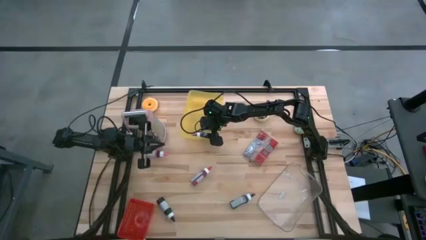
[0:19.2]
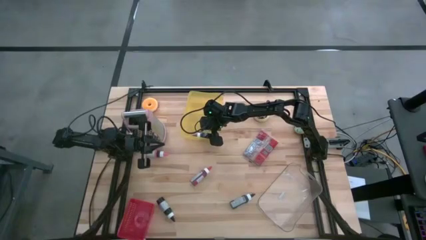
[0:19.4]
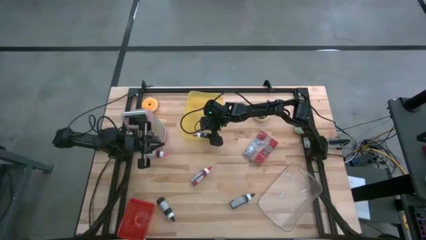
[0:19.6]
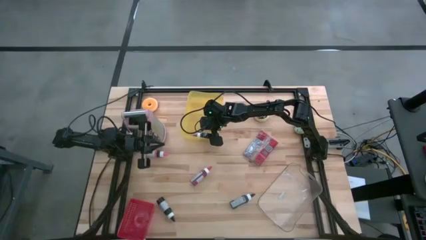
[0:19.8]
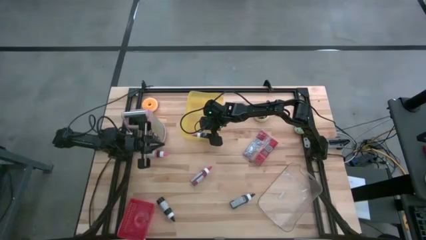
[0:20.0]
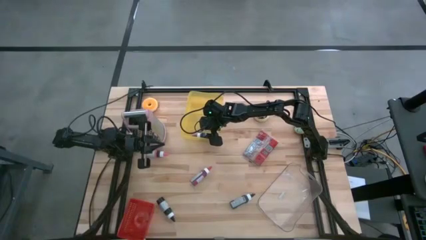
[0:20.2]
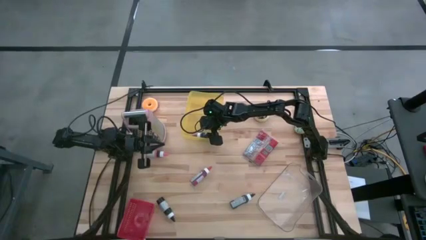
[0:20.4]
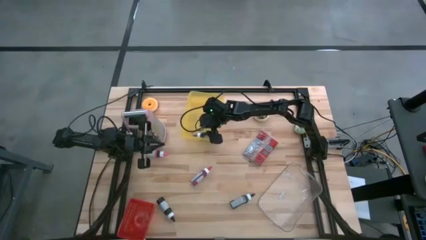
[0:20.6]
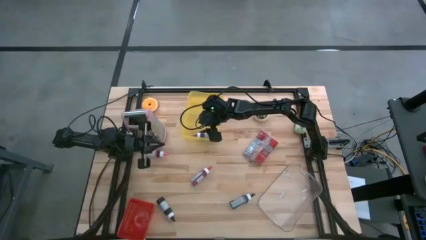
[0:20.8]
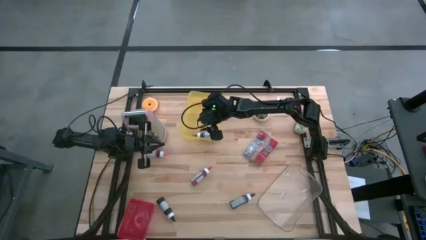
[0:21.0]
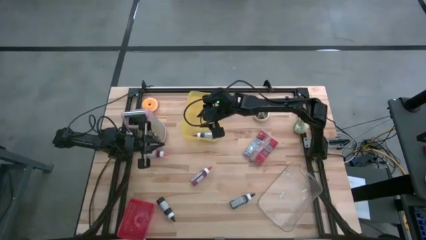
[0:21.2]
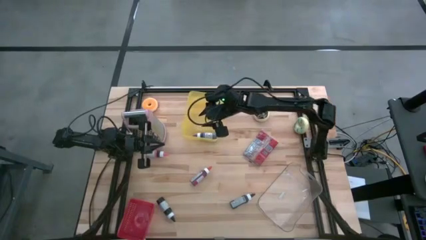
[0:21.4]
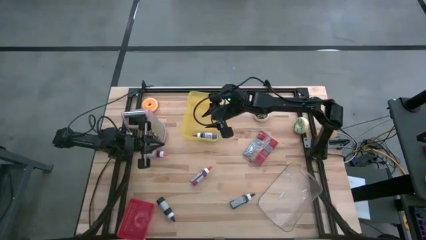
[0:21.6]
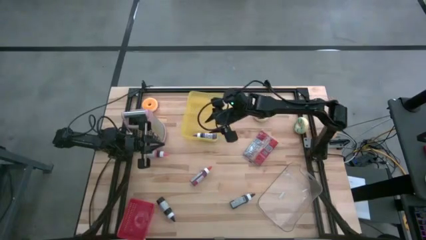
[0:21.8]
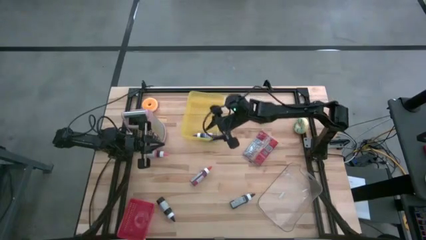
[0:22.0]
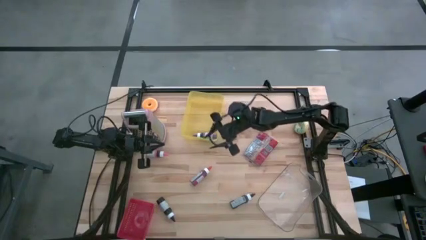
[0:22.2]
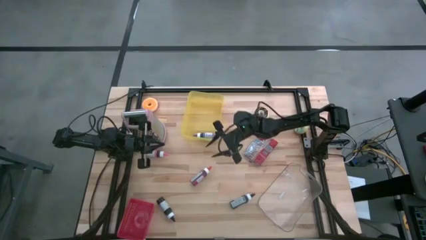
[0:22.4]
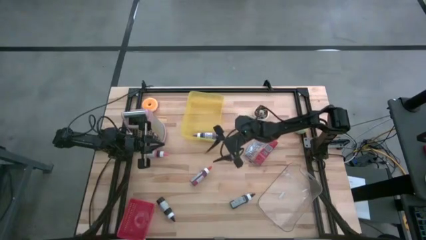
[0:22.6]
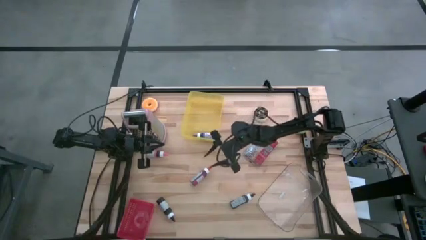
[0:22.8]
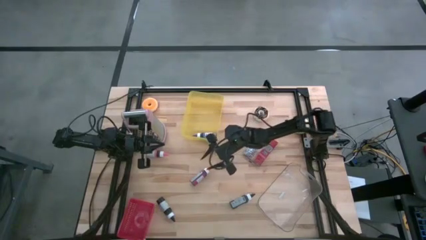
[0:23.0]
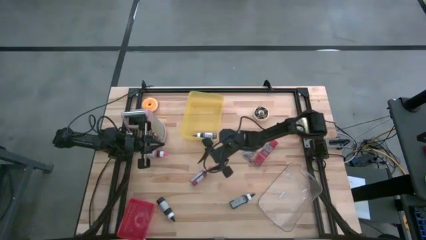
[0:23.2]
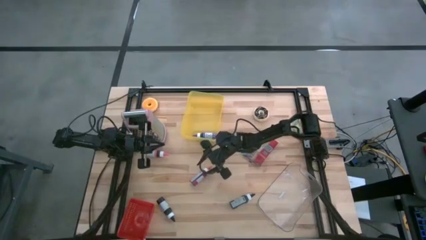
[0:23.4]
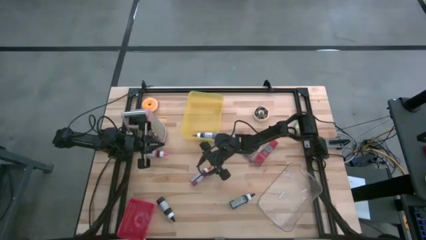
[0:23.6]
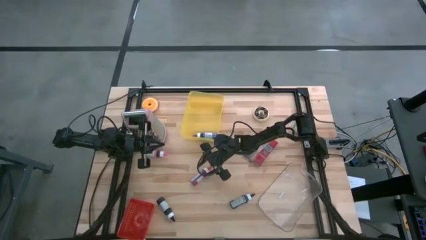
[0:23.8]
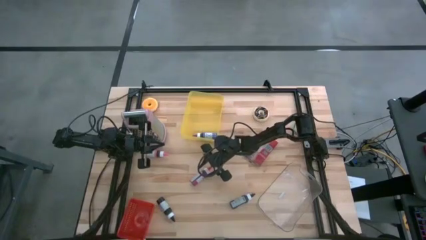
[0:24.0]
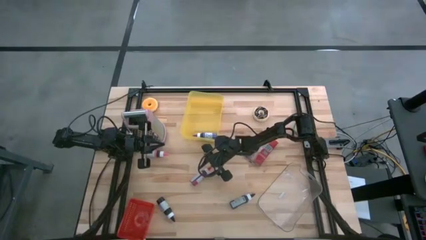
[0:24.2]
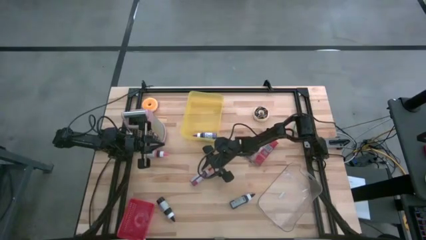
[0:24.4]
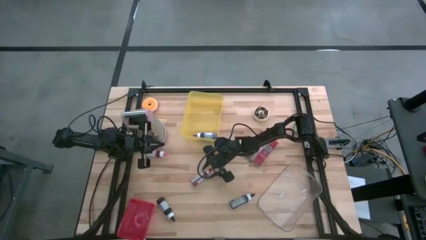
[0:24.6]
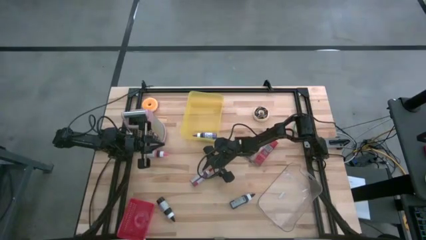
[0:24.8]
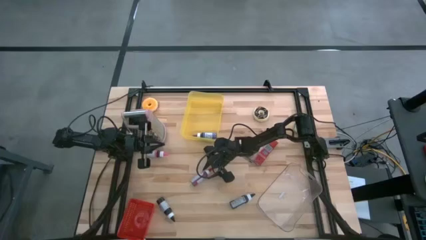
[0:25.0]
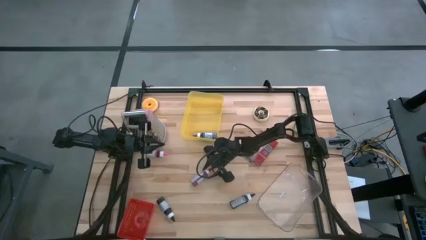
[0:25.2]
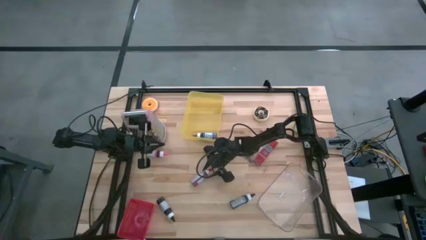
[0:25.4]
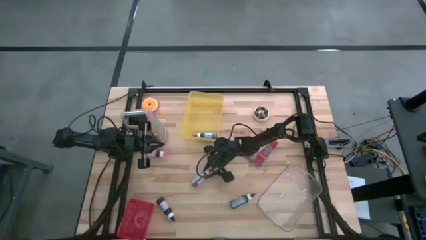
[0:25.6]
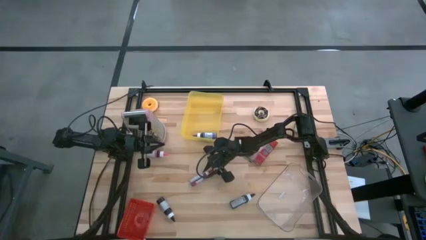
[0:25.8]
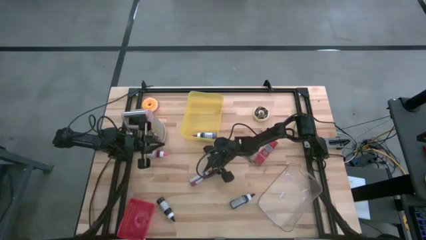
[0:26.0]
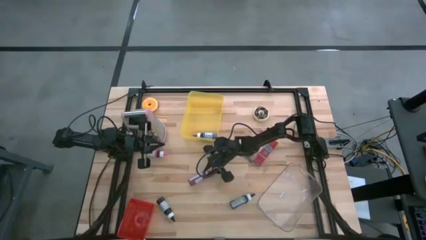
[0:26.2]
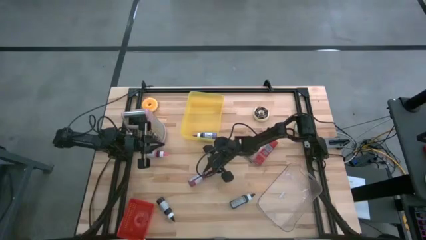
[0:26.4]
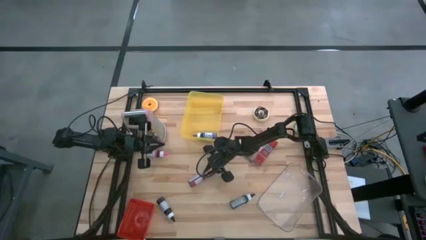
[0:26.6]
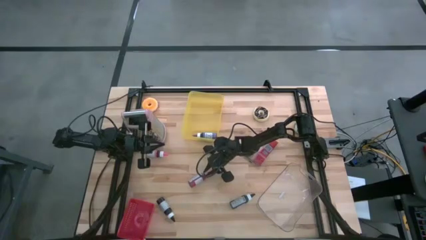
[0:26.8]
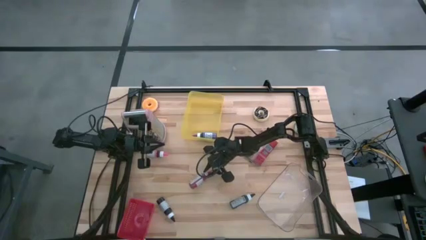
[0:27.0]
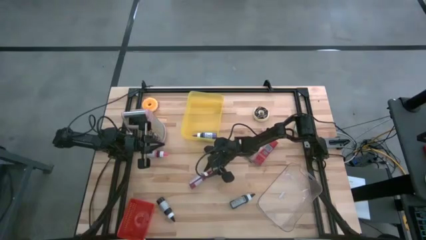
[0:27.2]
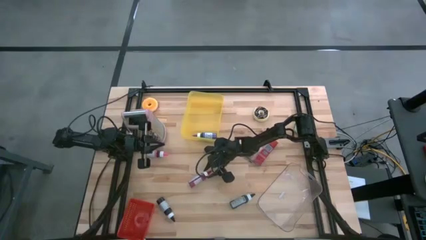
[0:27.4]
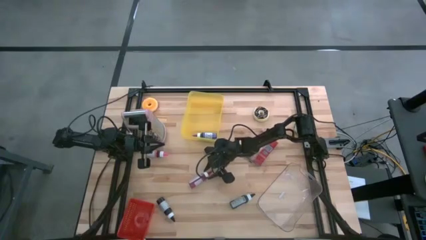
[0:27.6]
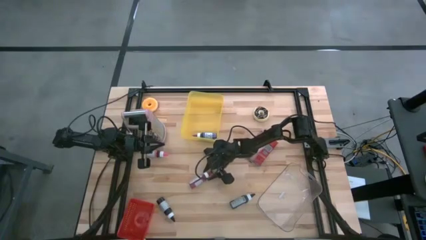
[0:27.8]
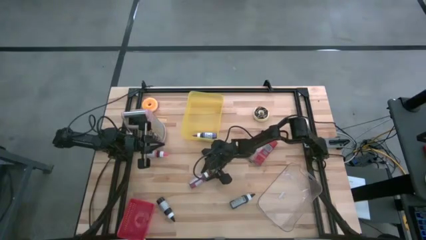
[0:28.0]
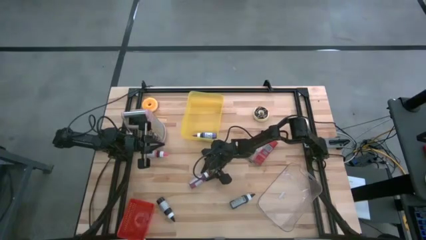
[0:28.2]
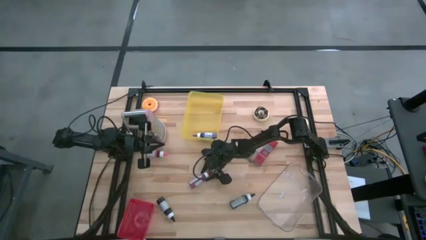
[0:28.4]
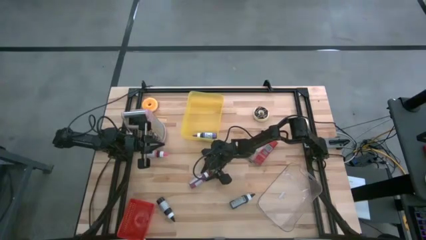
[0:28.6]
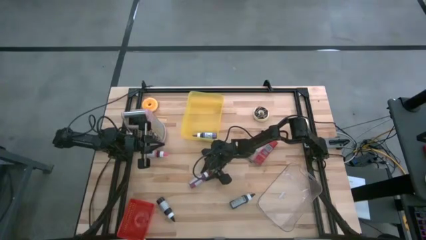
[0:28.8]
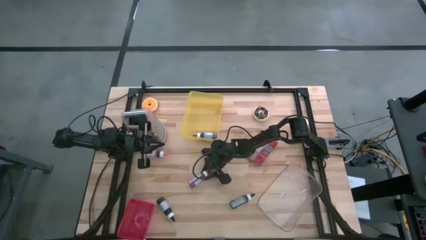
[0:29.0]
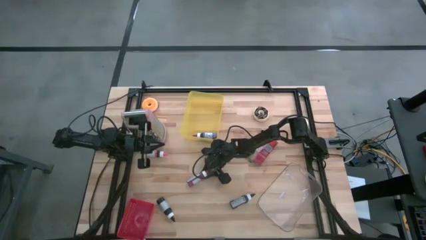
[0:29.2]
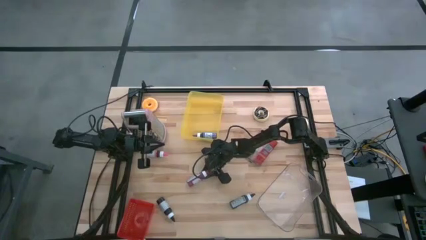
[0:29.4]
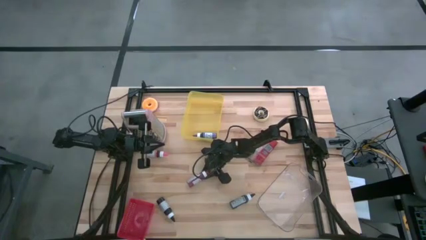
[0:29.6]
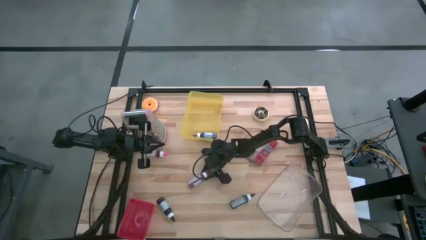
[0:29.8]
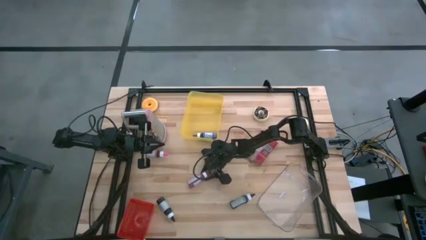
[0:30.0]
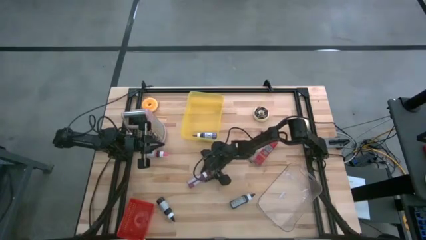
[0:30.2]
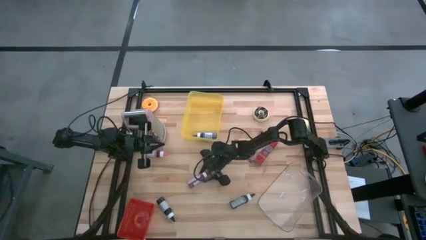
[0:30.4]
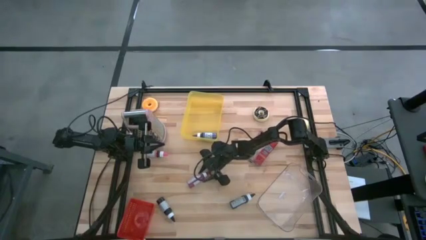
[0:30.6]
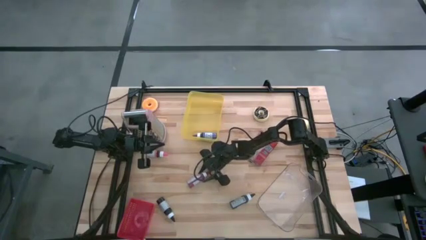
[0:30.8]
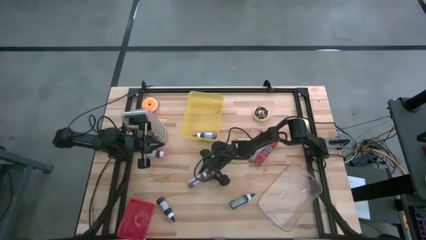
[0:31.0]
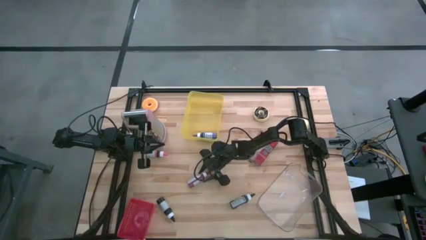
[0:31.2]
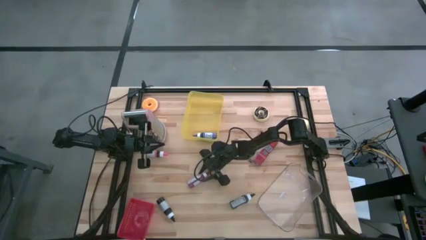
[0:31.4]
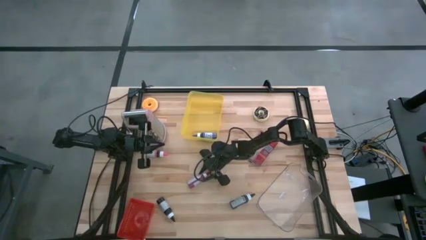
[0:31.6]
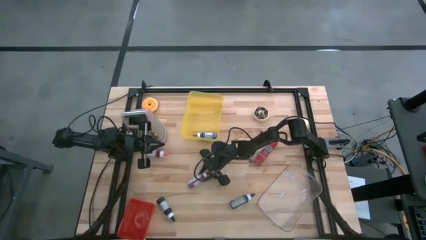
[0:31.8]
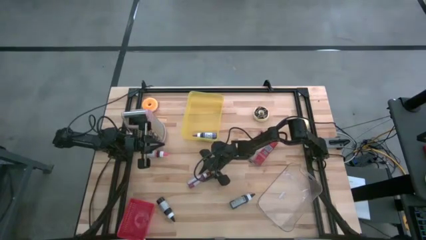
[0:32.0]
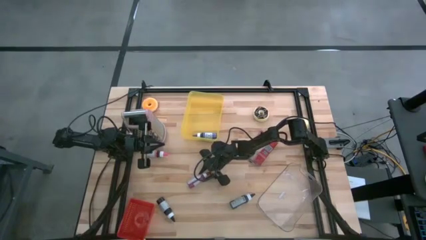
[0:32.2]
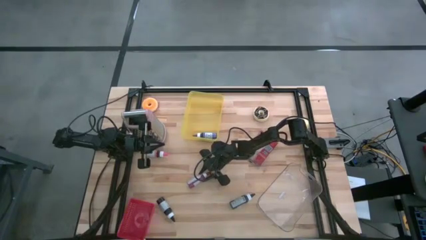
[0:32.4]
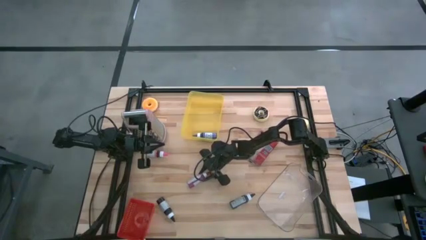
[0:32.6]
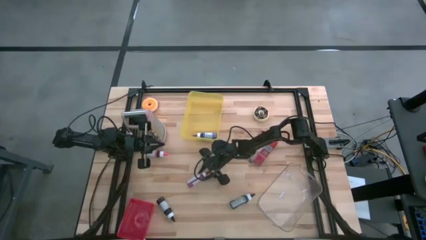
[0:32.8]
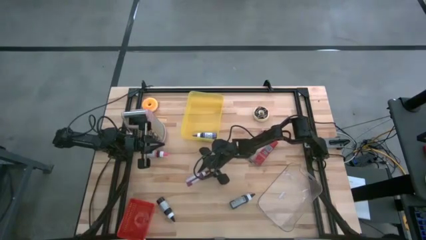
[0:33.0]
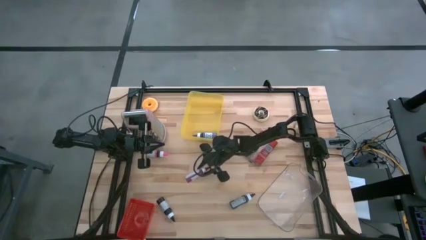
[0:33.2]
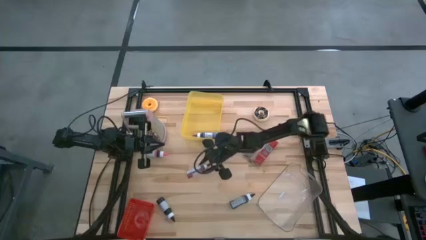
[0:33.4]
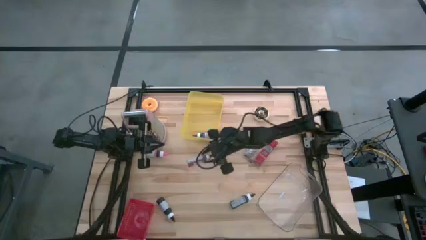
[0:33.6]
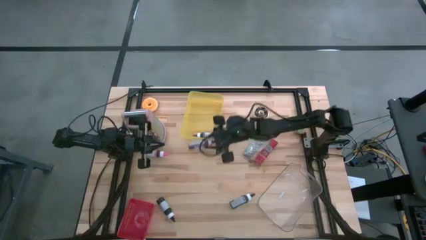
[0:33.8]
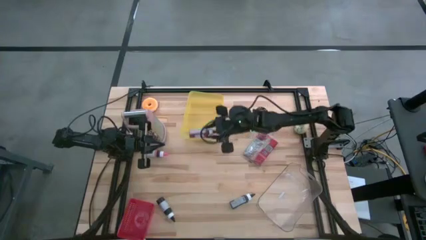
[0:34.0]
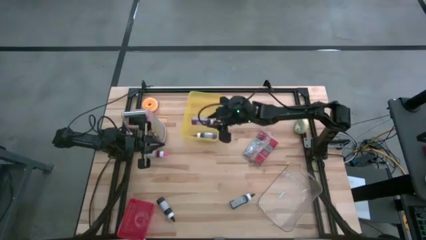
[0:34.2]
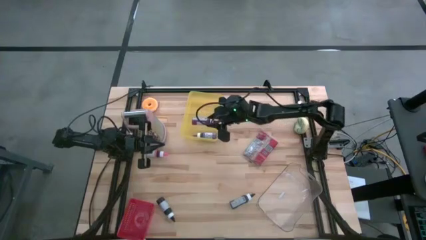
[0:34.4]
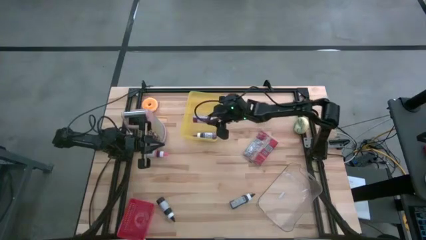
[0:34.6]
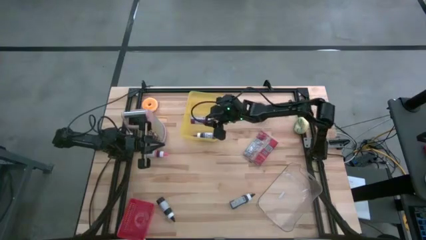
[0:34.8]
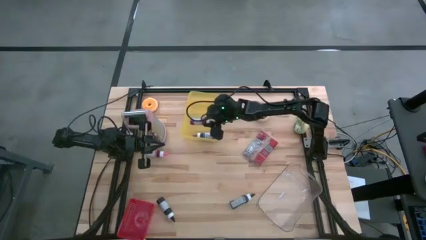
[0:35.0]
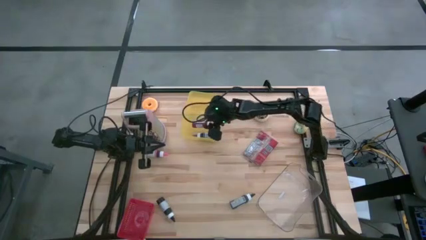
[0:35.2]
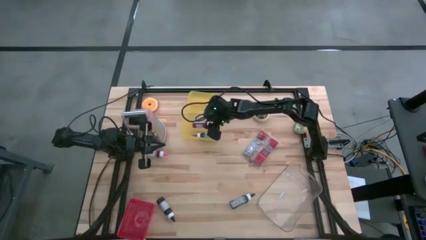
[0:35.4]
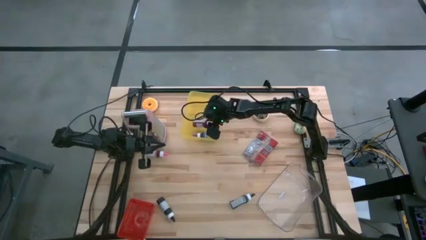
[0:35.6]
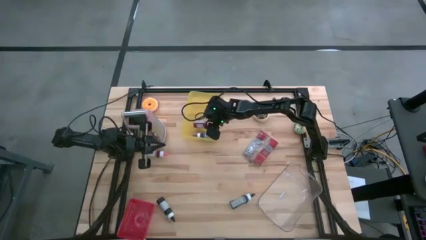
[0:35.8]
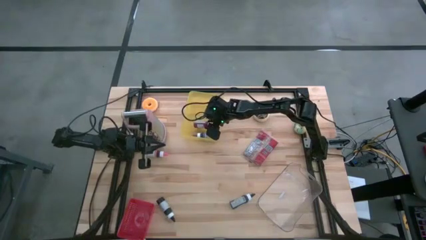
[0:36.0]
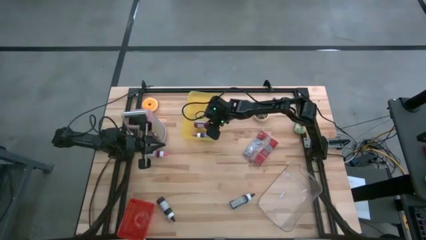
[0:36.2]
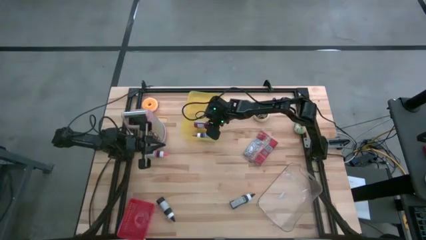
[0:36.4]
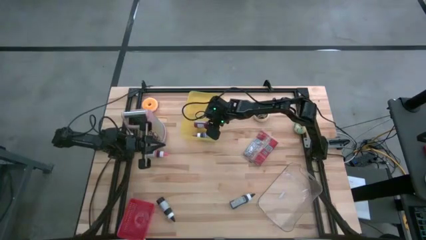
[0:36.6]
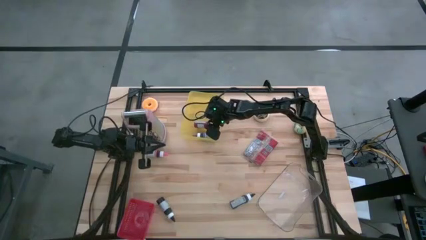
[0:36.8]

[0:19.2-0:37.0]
Task: Pick & Place Food Item
Put the red food coloring into the yellow bin
